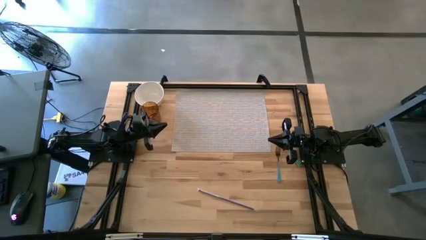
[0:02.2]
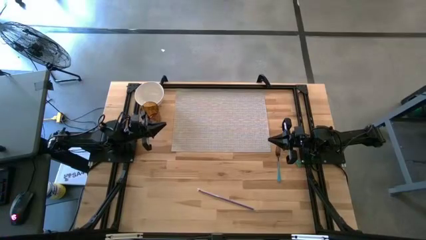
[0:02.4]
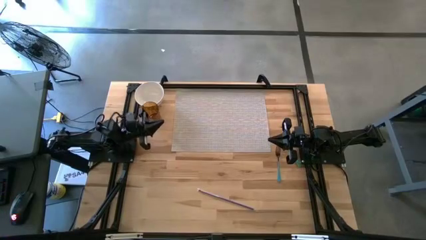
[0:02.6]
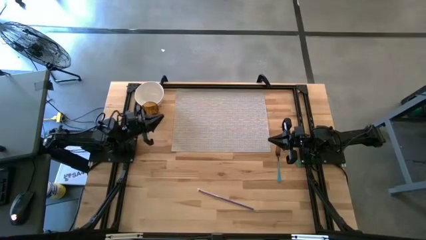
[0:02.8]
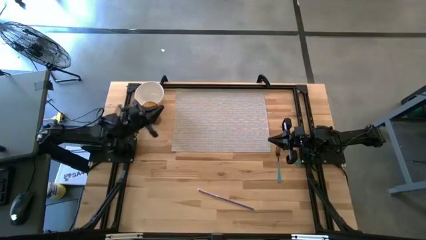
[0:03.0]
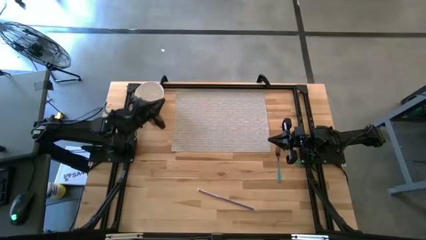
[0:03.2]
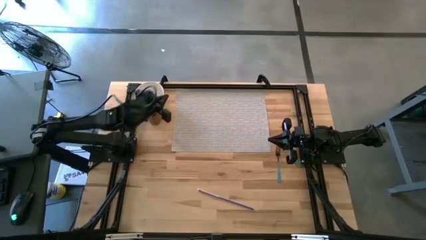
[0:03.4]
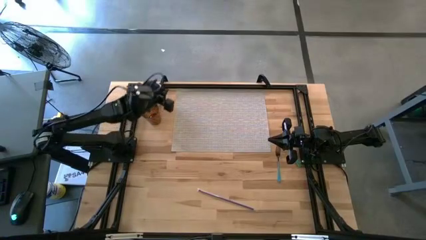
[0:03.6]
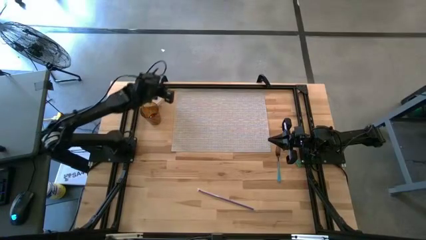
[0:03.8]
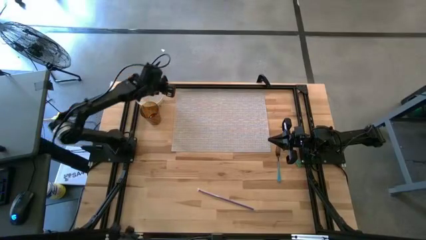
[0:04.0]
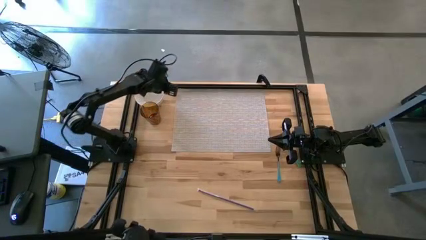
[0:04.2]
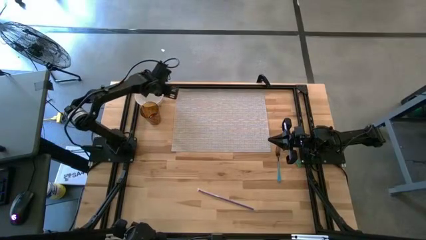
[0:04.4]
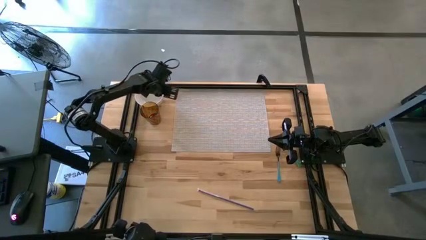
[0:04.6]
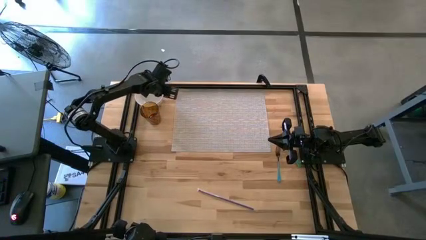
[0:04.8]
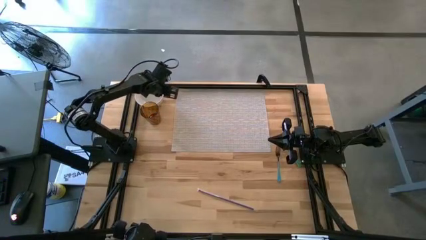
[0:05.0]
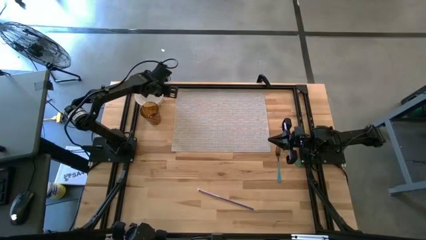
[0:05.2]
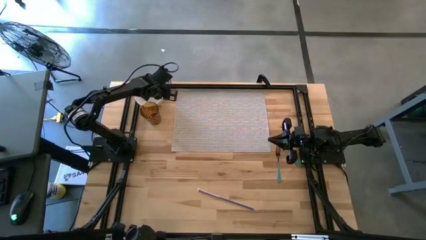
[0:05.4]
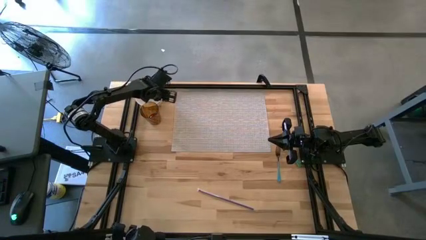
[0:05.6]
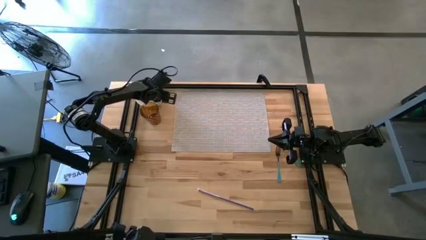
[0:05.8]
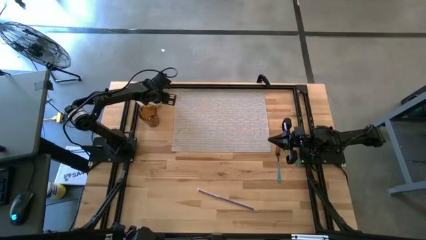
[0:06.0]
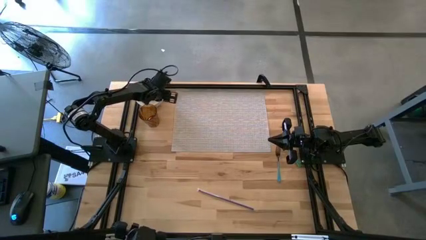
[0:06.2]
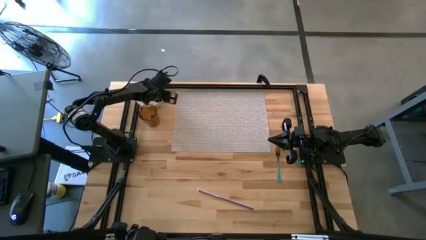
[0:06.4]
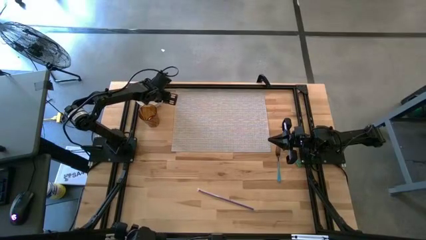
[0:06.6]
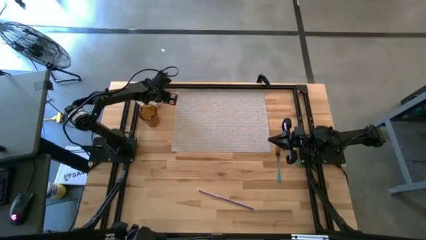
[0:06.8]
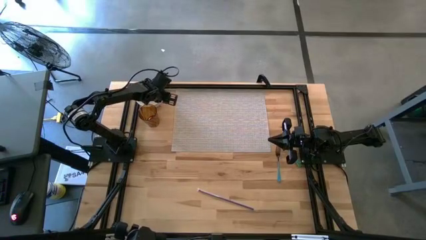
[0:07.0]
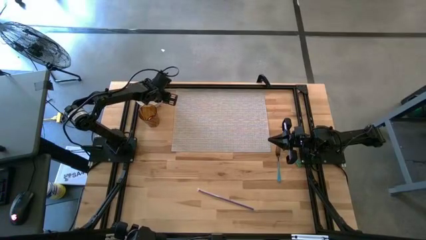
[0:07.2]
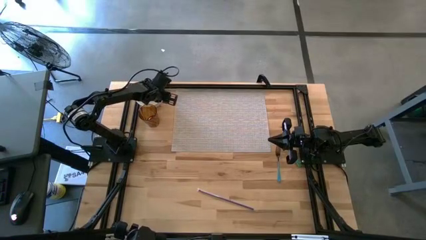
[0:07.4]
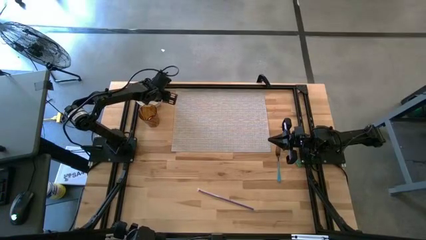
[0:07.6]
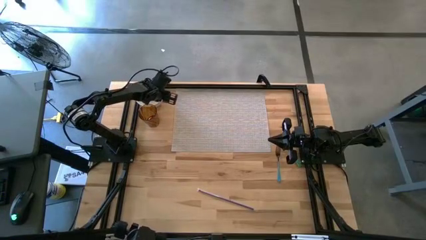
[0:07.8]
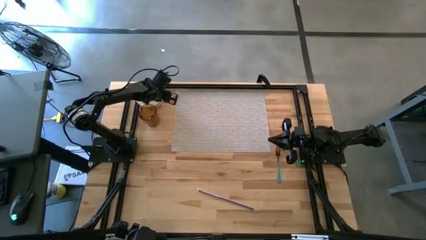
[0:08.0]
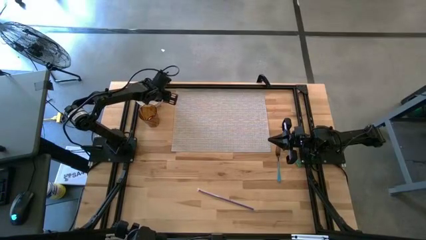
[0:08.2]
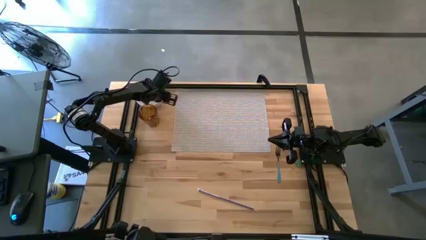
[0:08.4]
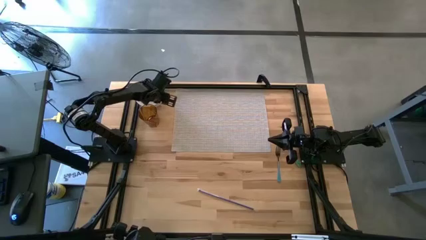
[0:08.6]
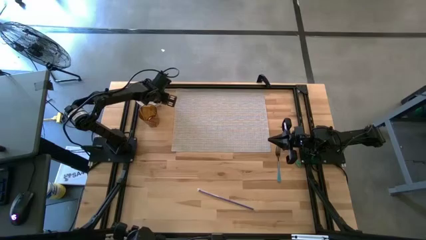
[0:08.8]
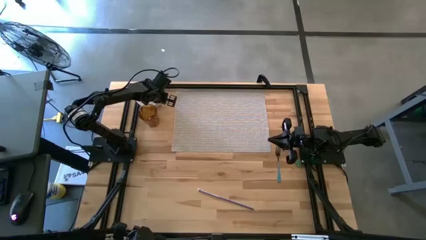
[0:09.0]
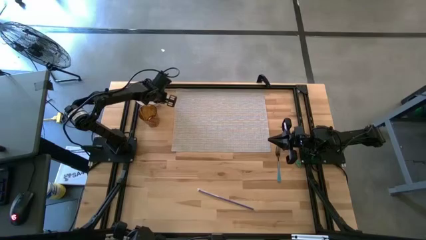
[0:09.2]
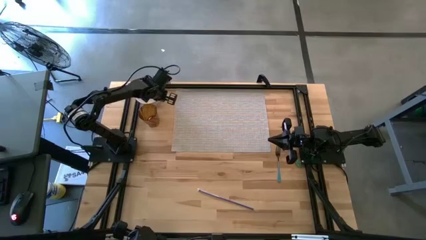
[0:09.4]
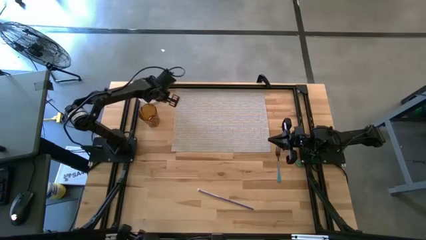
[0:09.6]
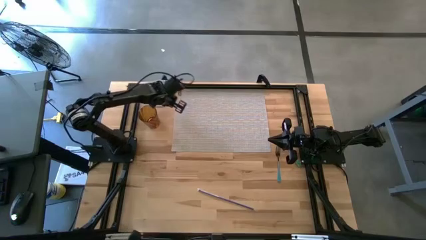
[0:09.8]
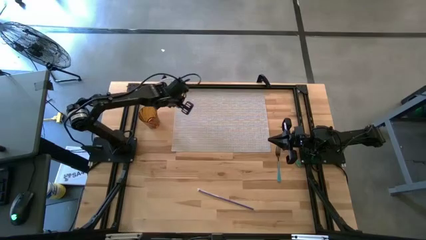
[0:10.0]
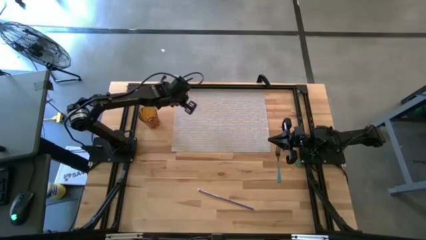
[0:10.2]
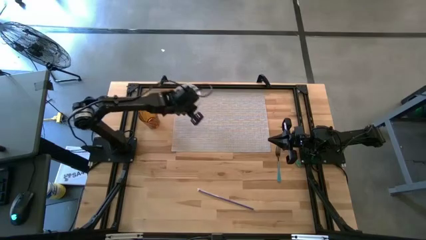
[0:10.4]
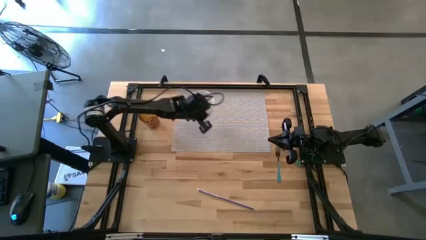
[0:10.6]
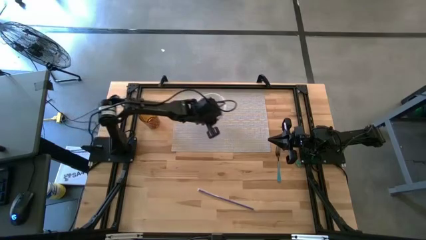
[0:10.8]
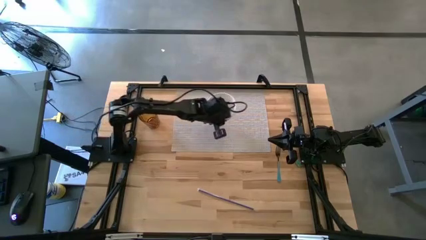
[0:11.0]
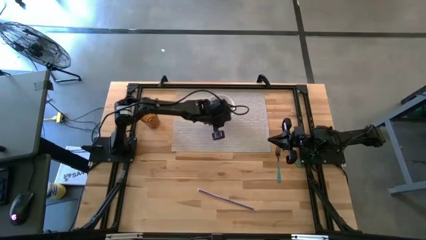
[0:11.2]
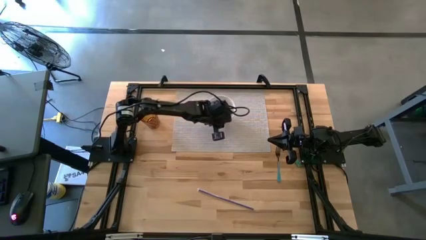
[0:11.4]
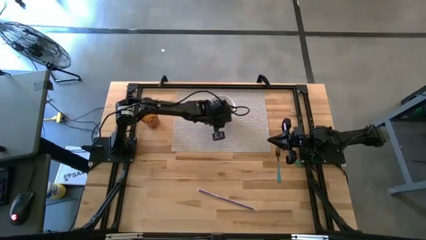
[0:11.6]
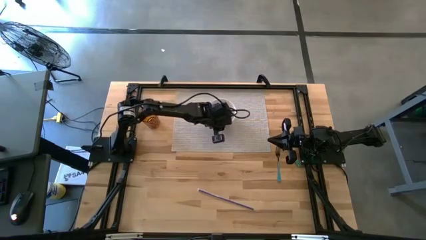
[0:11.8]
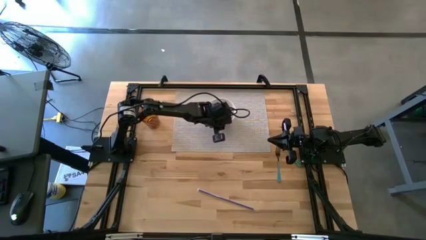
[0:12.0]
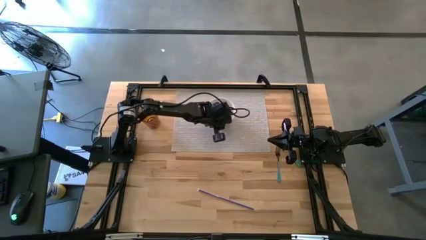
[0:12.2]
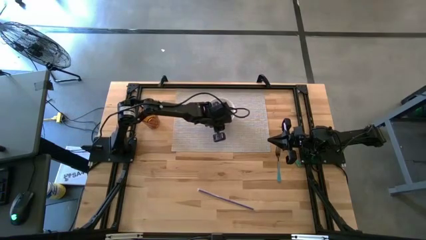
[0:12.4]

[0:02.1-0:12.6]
Task: Pick & Place Utensil
Put the white bowl on the gray mat
